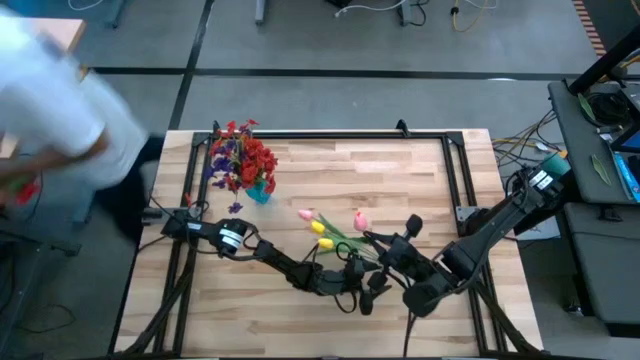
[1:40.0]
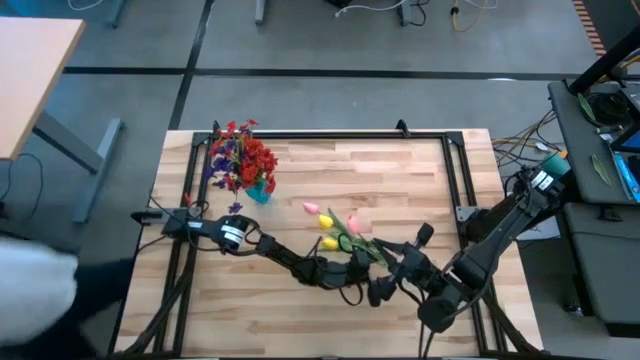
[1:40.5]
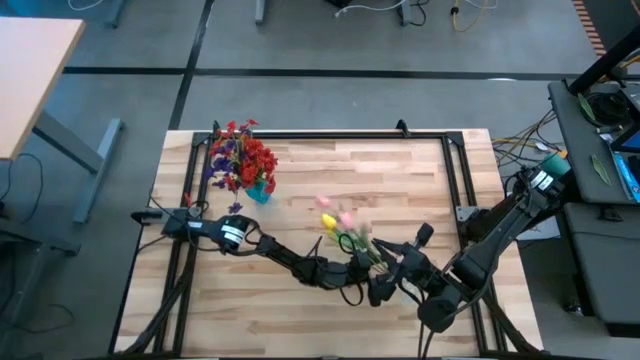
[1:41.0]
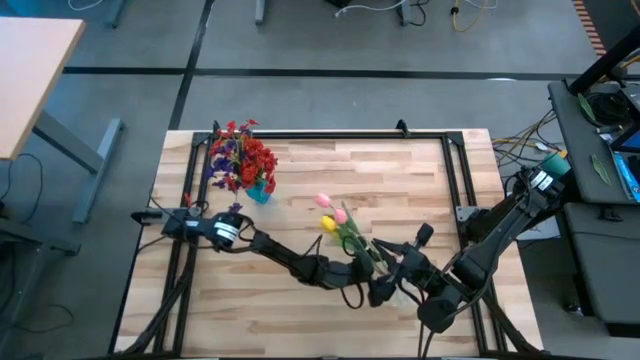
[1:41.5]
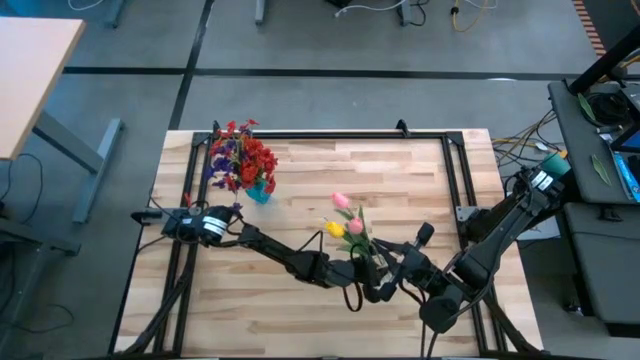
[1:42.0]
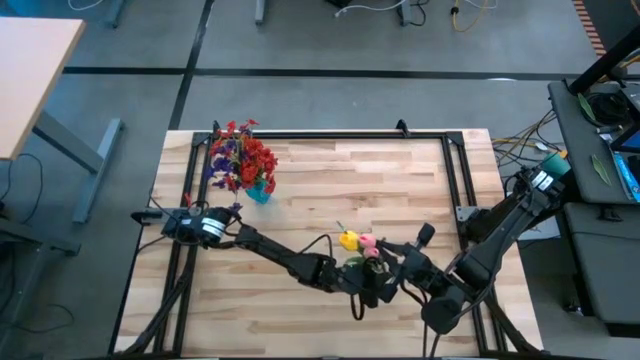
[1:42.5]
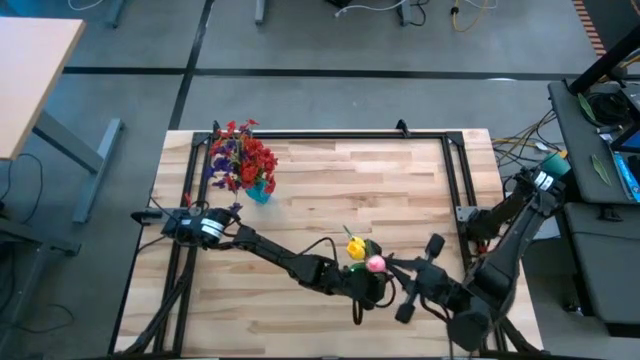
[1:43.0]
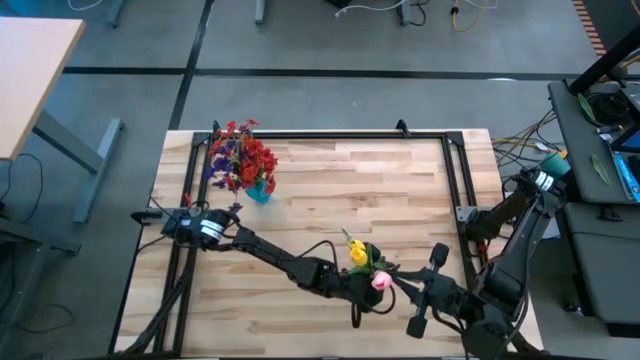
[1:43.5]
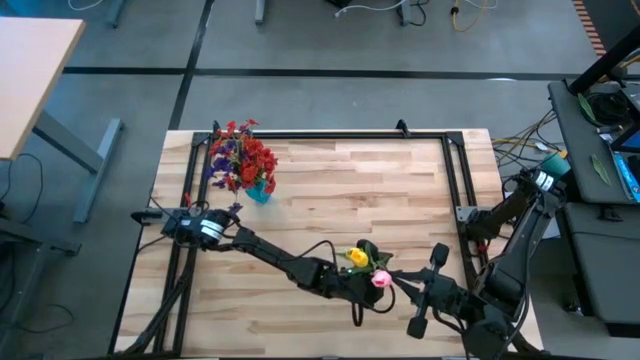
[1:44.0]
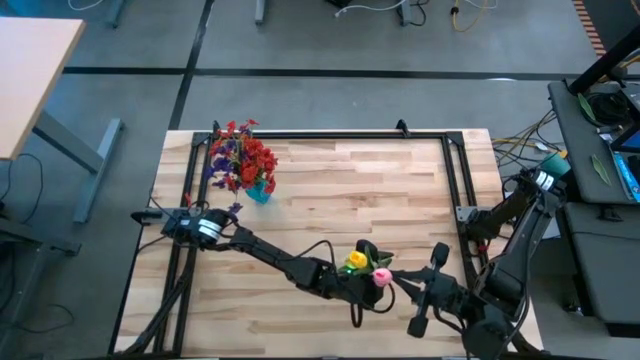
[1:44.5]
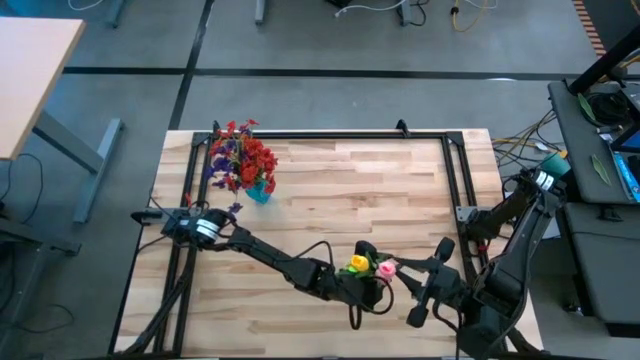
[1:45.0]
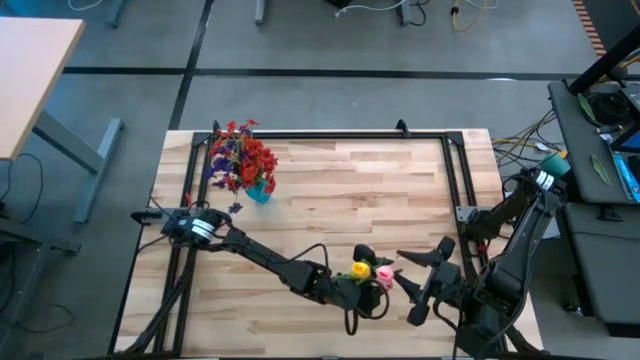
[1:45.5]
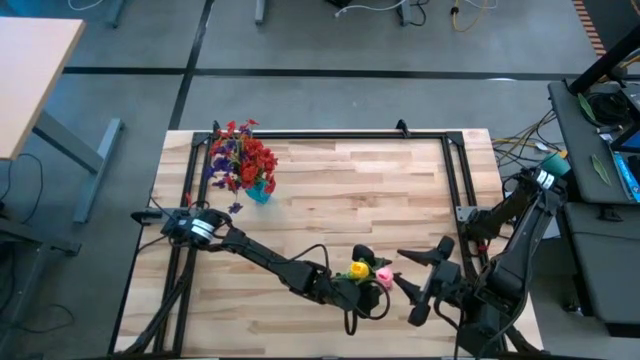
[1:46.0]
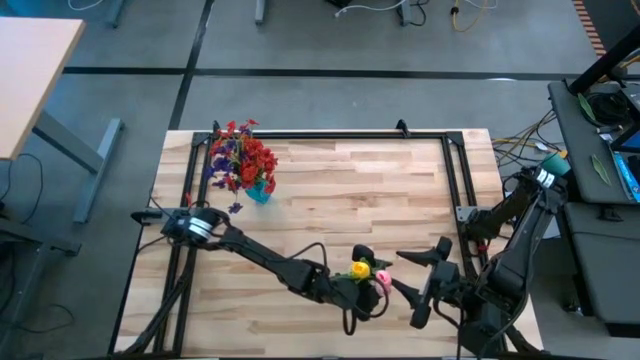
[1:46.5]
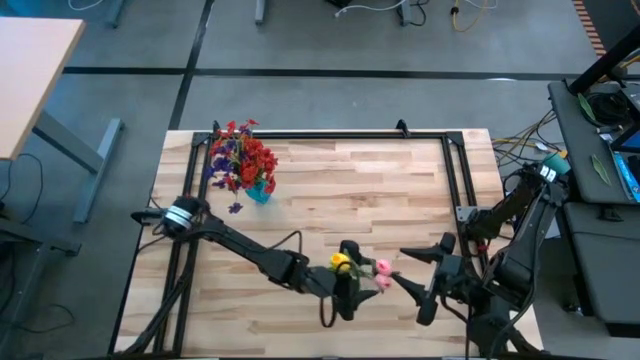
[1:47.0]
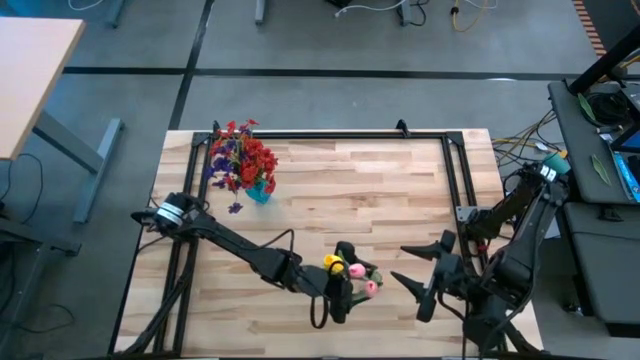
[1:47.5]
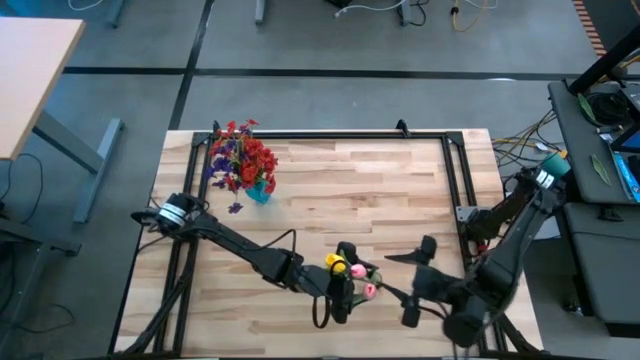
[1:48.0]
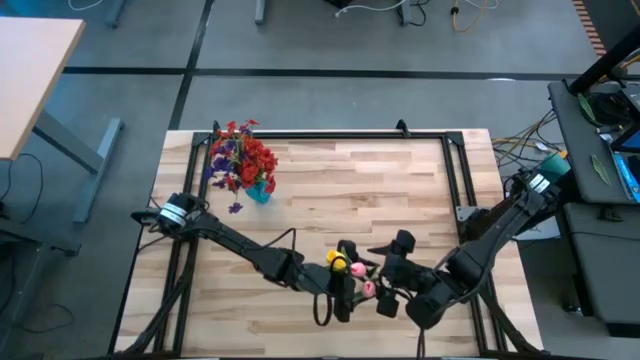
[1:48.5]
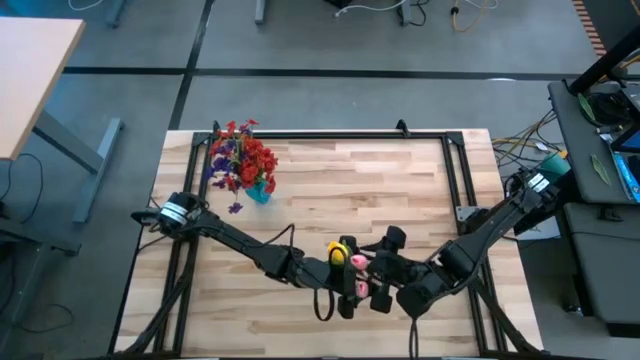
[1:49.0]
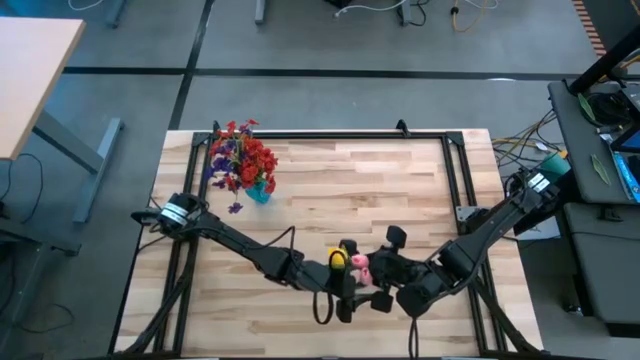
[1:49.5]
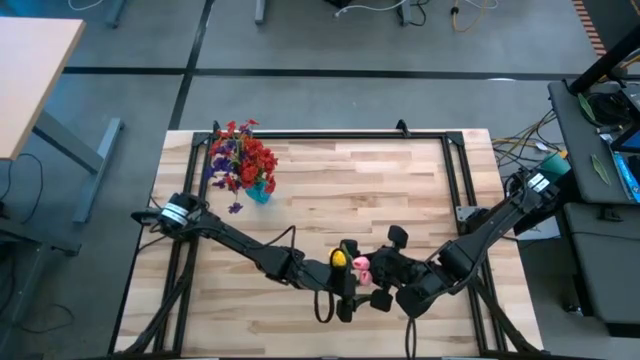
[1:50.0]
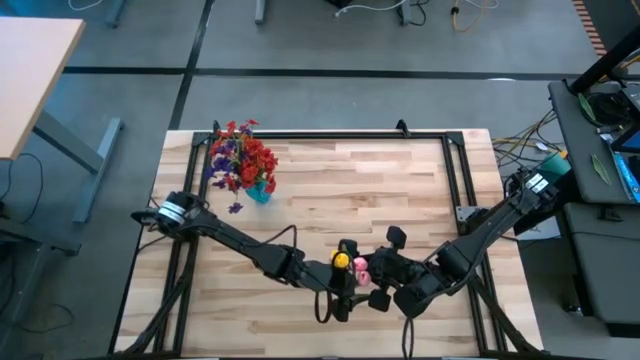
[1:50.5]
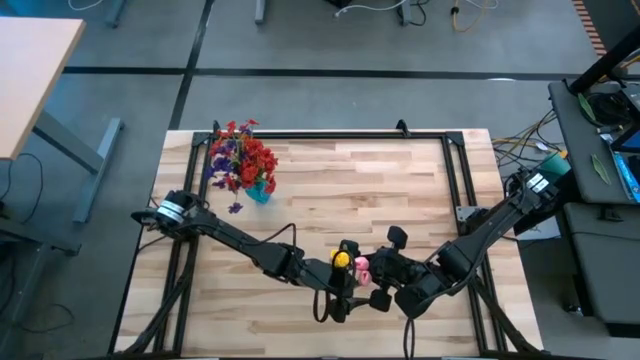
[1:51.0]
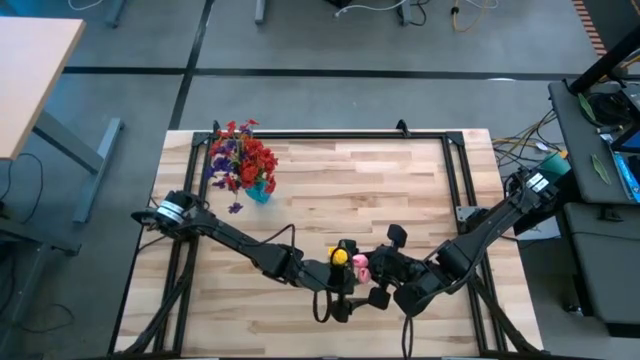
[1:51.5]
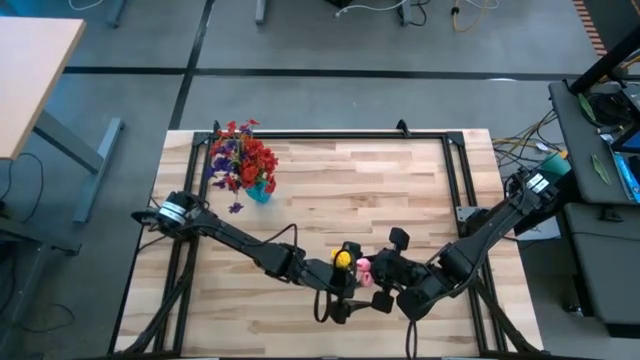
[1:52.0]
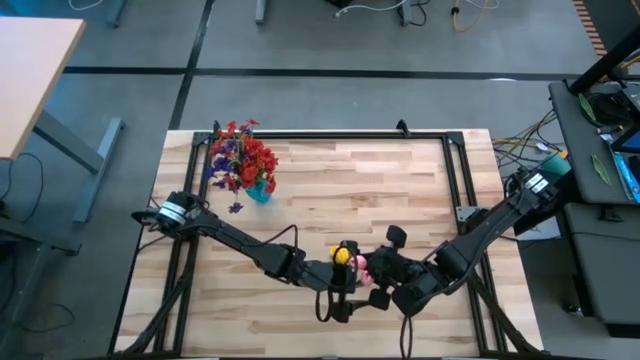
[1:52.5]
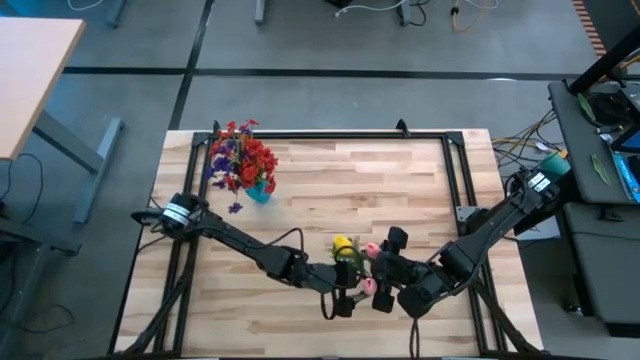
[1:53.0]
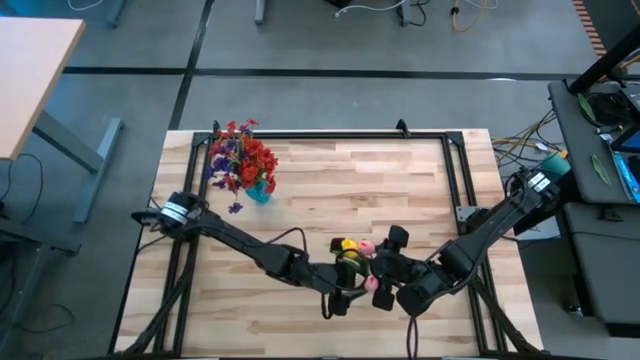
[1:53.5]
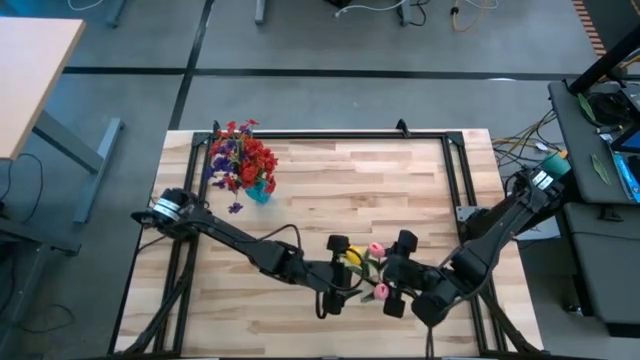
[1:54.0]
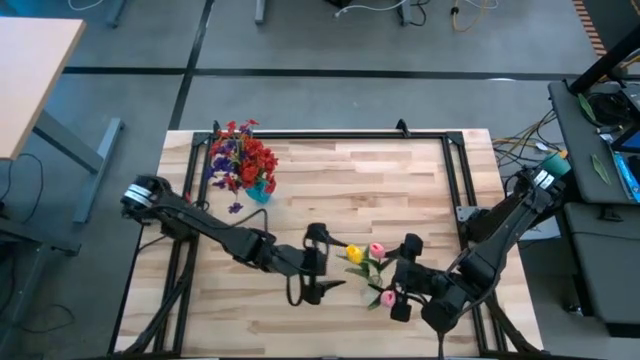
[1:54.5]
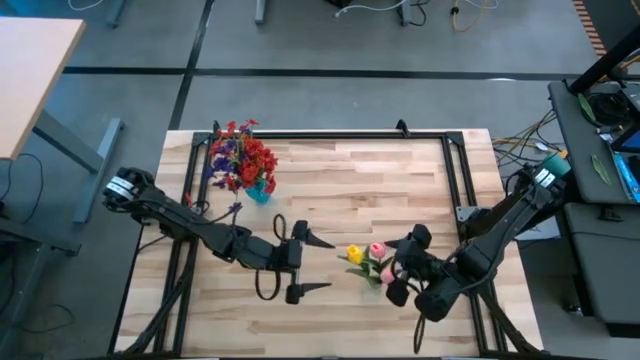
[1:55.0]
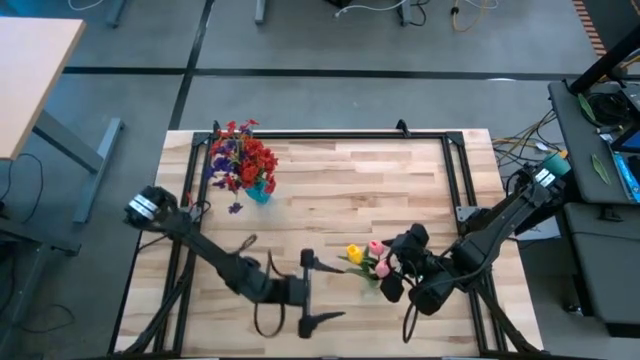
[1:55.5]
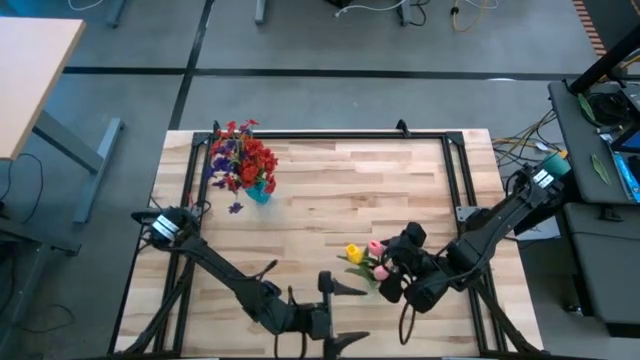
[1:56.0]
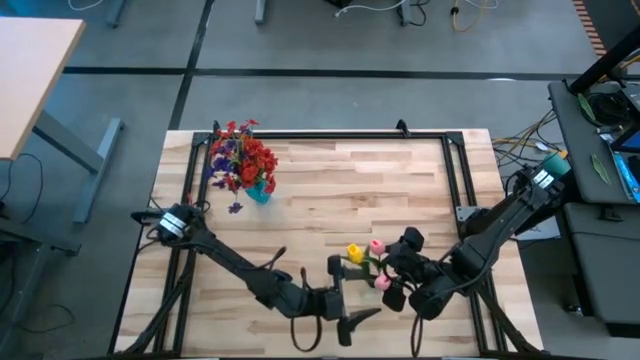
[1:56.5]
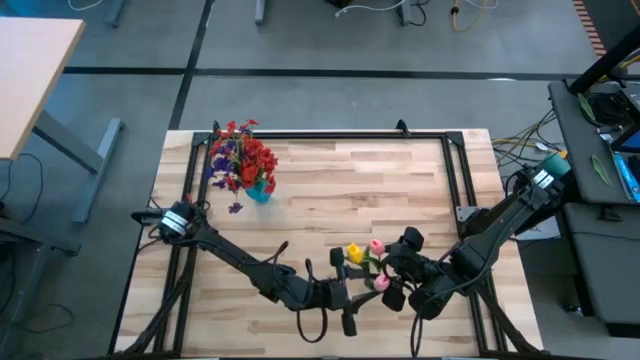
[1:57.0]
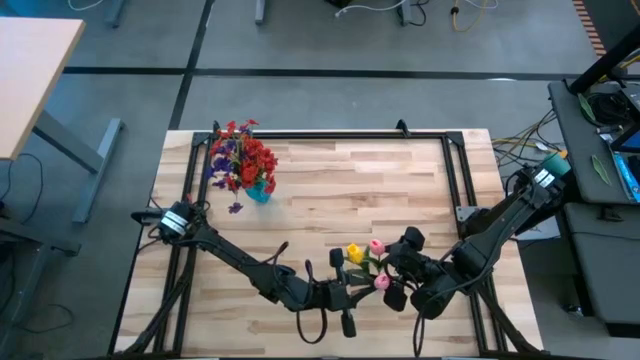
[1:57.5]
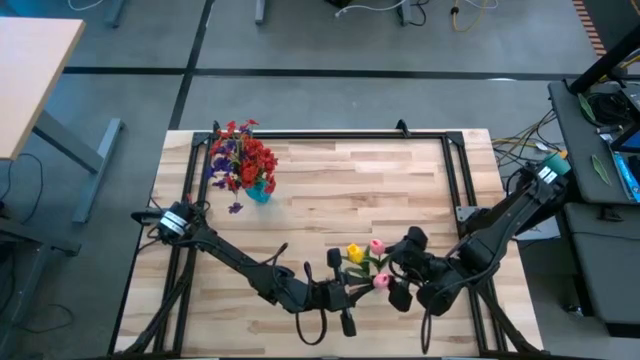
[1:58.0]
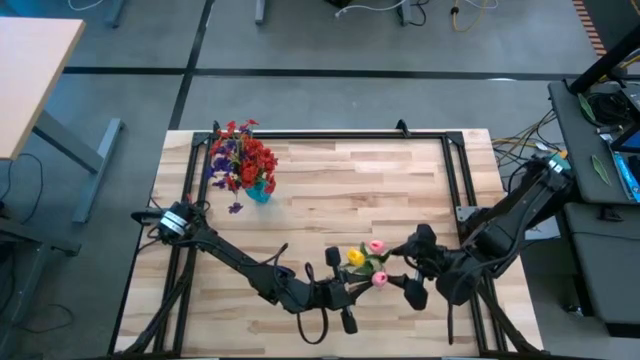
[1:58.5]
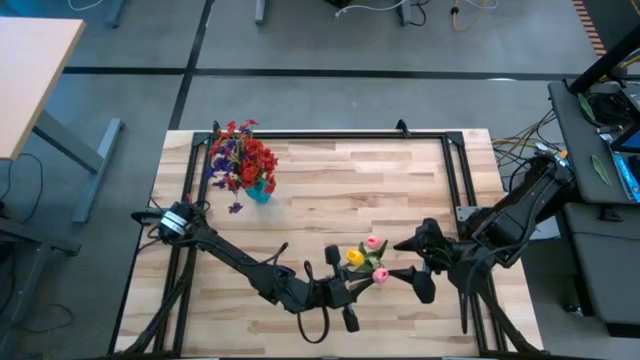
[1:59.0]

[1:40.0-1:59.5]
Task: Sort flowers into vase by color
Put the pink tulip into the transparent vase

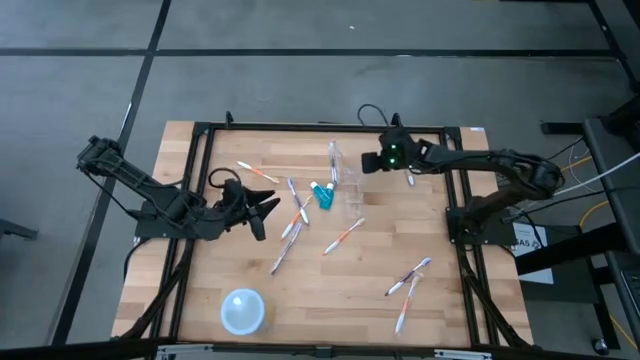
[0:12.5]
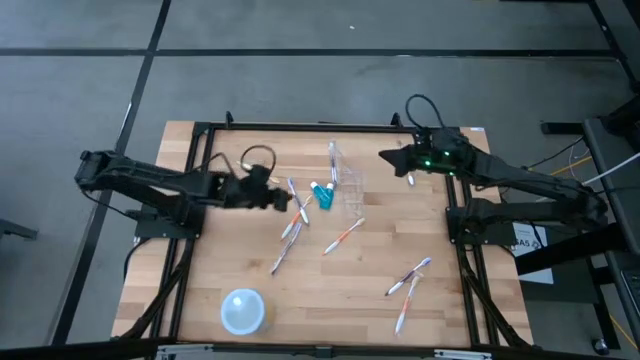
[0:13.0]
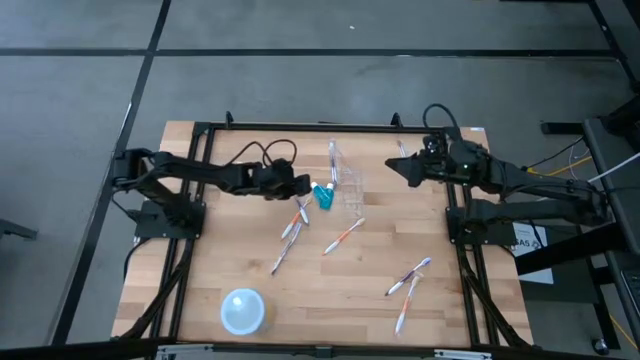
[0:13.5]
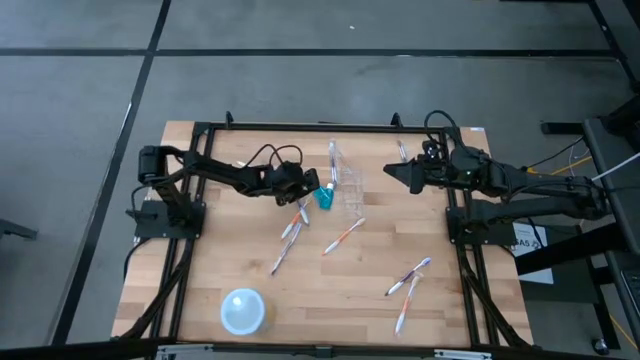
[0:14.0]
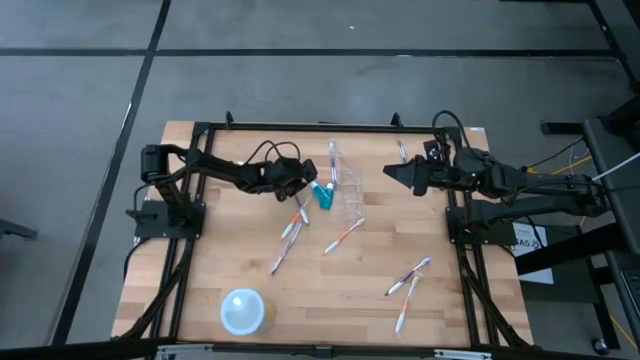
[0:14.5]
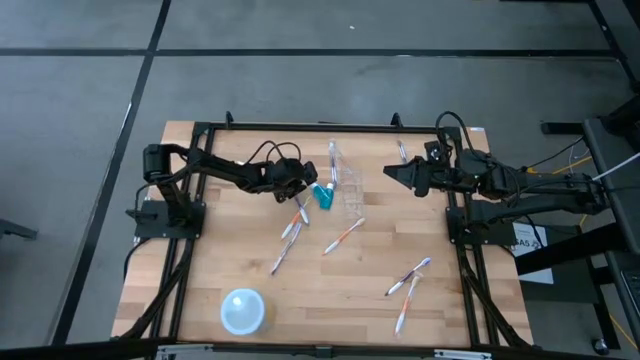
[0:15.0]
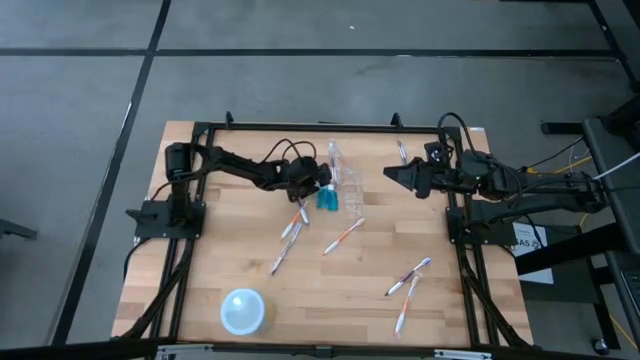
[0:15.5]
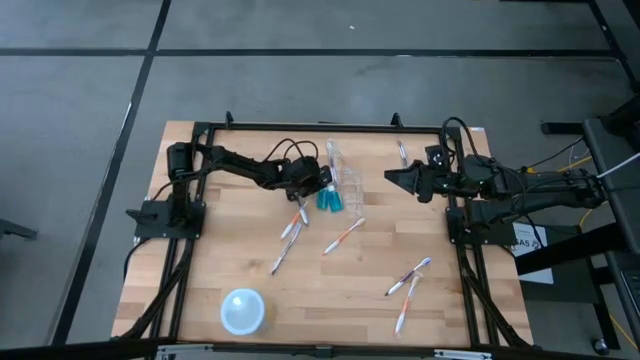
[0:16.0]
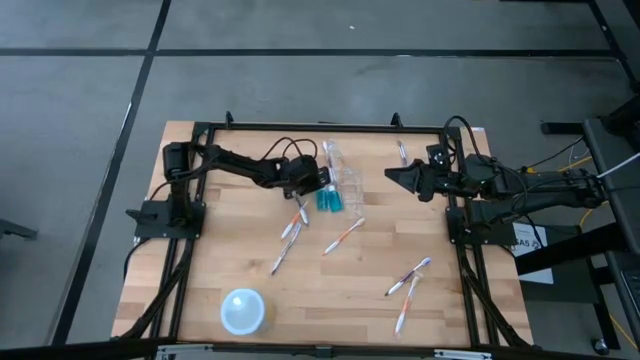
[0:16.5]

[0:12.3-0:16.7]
Task: Pick & Place toothbrushing station
Put the blue mouthwash bottle into the transparent organizer
